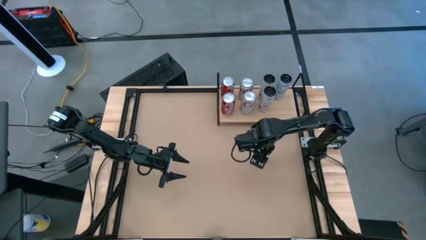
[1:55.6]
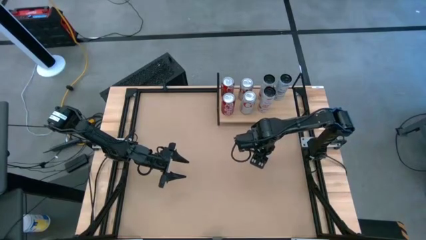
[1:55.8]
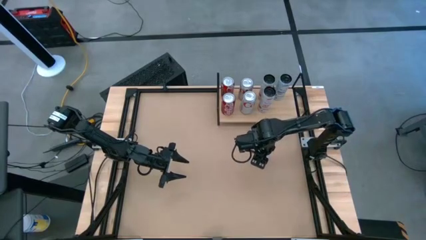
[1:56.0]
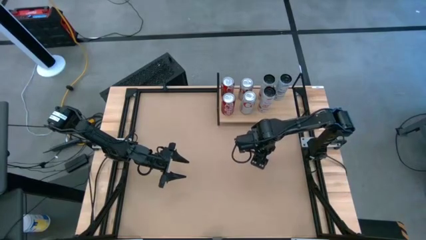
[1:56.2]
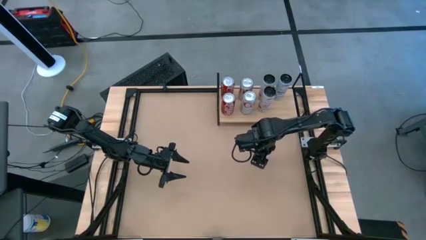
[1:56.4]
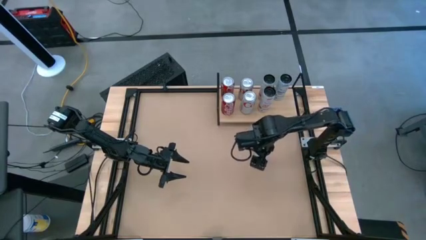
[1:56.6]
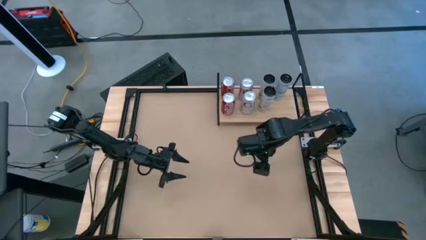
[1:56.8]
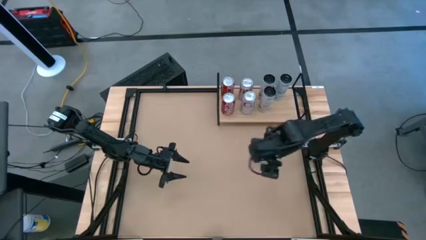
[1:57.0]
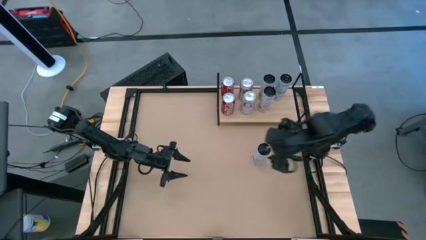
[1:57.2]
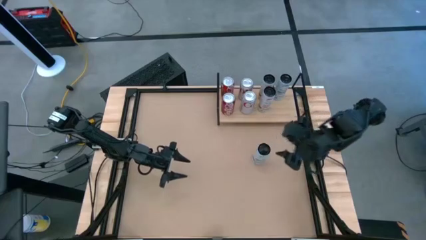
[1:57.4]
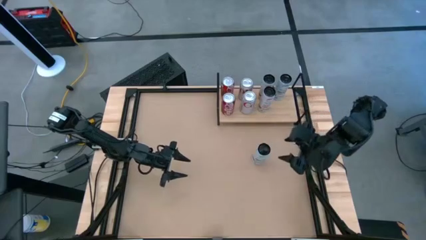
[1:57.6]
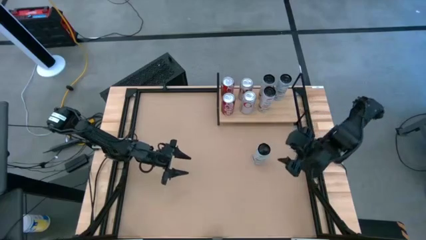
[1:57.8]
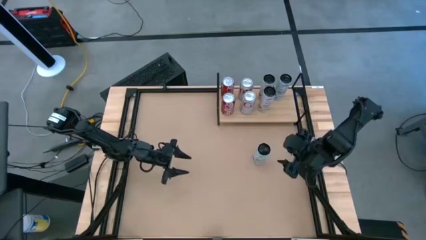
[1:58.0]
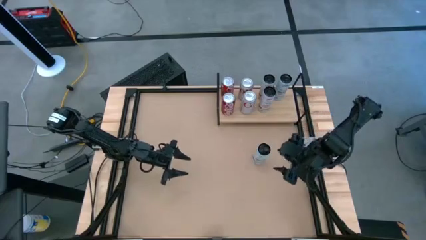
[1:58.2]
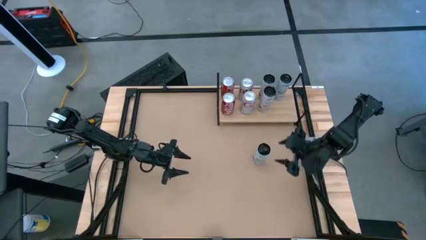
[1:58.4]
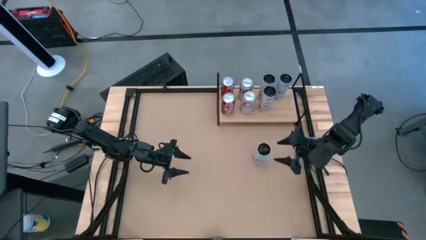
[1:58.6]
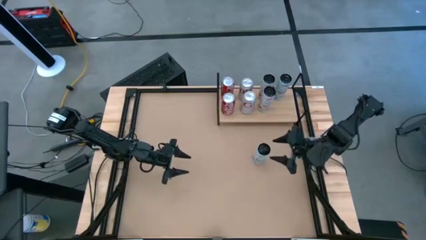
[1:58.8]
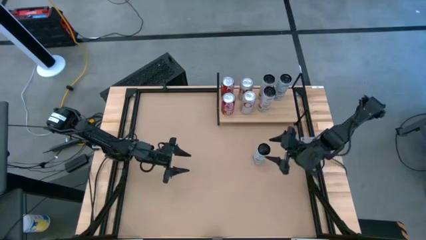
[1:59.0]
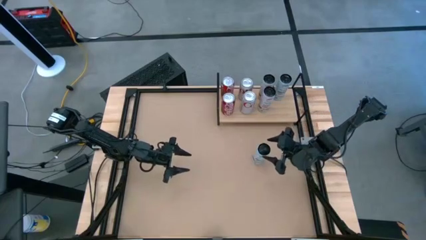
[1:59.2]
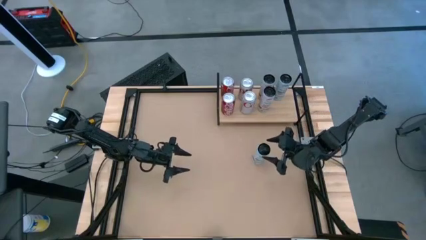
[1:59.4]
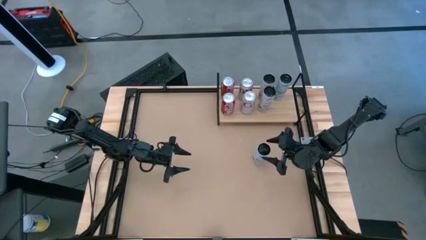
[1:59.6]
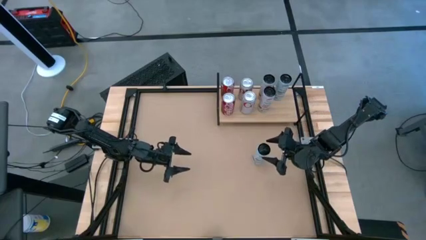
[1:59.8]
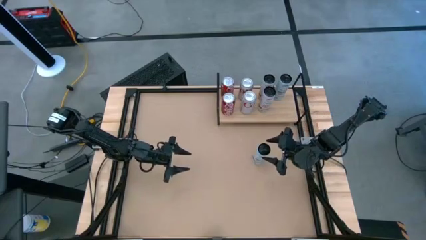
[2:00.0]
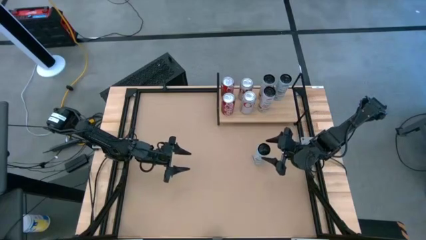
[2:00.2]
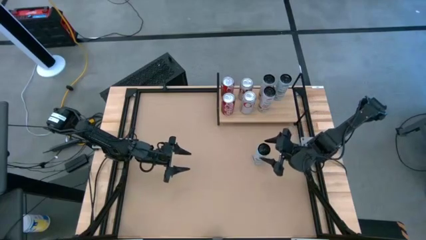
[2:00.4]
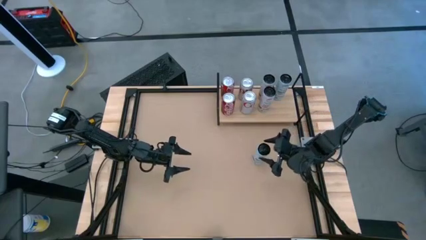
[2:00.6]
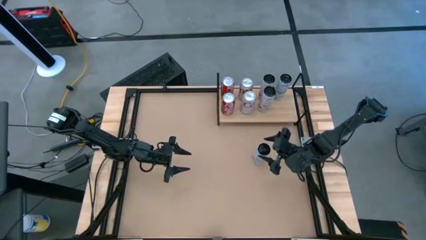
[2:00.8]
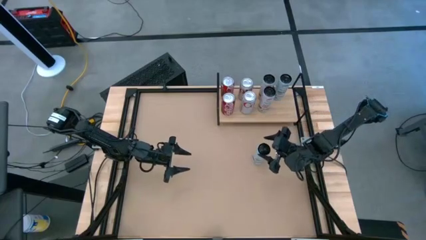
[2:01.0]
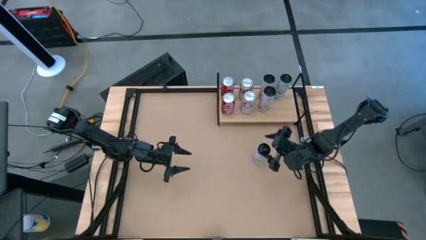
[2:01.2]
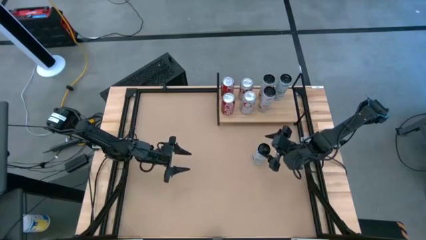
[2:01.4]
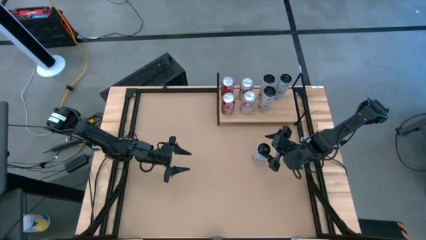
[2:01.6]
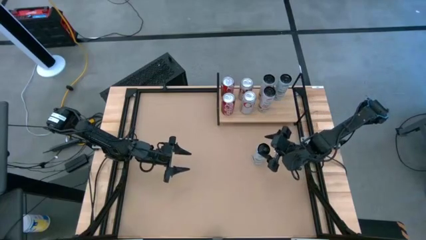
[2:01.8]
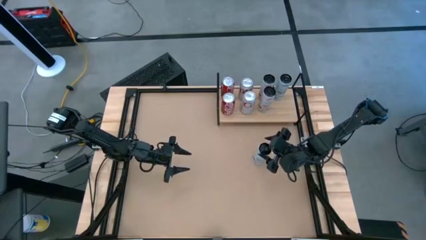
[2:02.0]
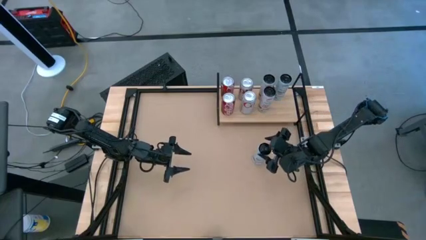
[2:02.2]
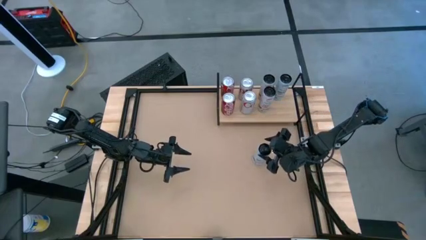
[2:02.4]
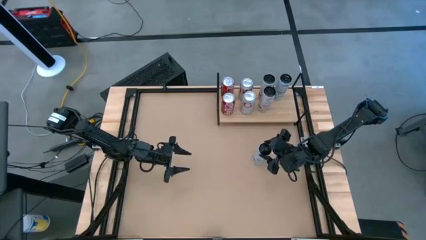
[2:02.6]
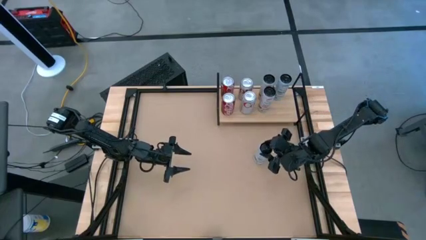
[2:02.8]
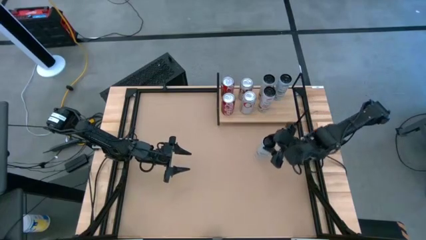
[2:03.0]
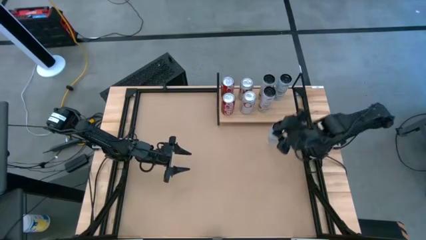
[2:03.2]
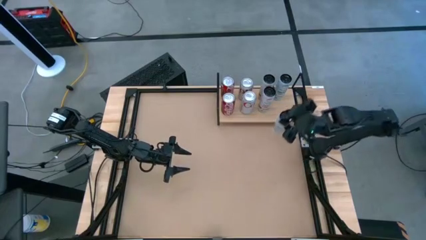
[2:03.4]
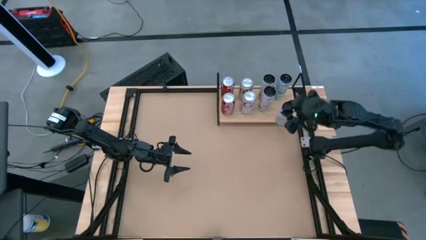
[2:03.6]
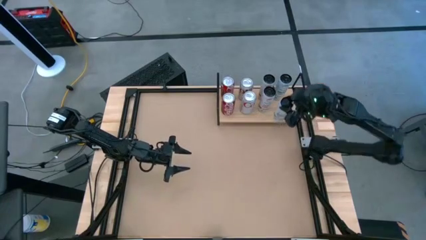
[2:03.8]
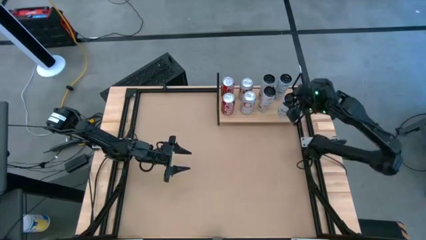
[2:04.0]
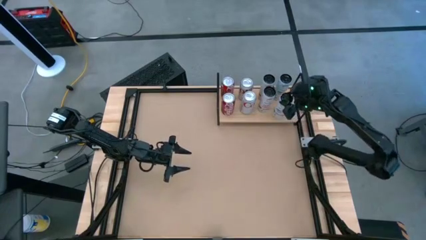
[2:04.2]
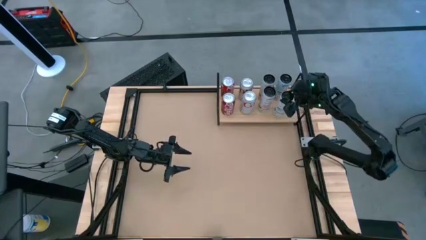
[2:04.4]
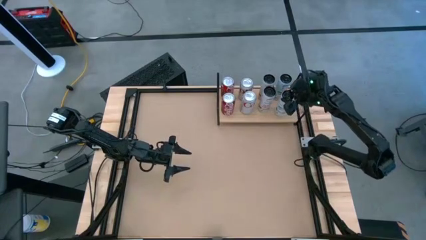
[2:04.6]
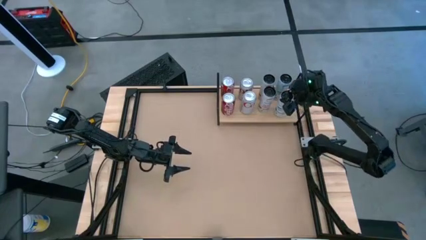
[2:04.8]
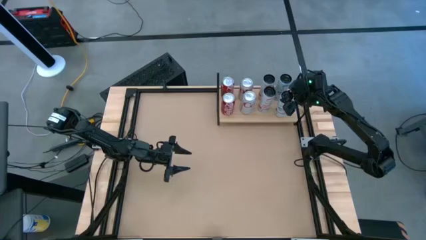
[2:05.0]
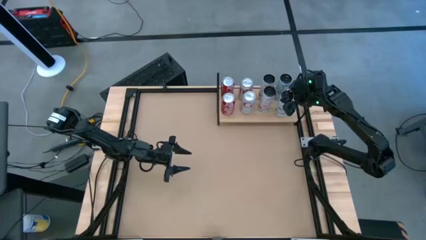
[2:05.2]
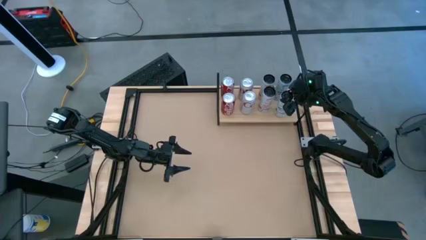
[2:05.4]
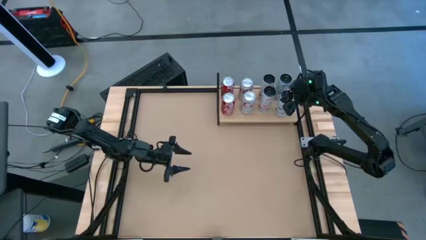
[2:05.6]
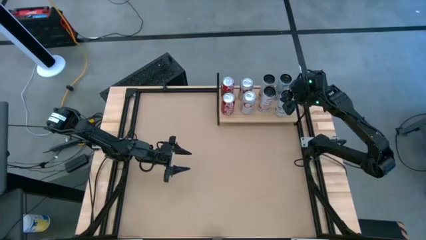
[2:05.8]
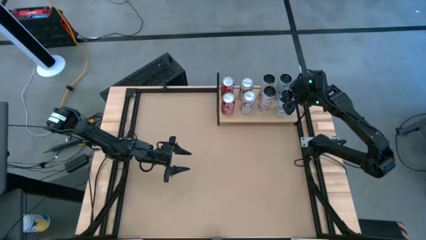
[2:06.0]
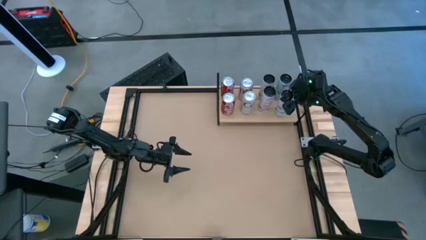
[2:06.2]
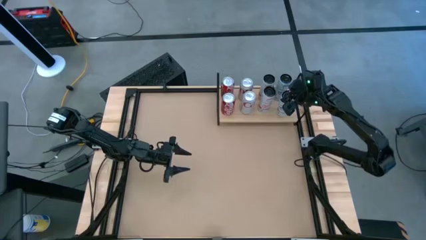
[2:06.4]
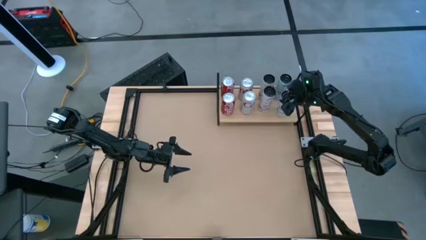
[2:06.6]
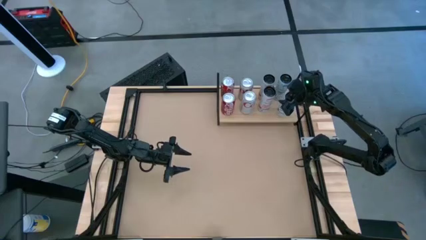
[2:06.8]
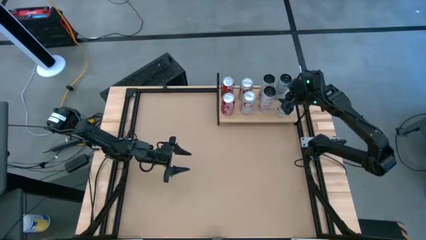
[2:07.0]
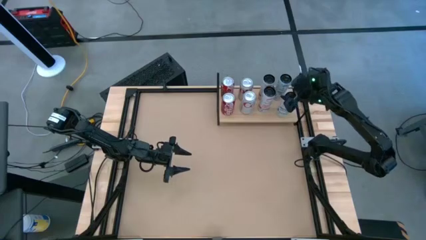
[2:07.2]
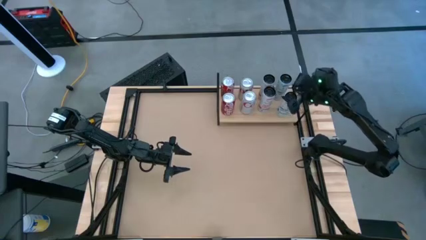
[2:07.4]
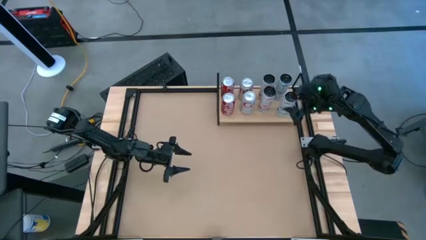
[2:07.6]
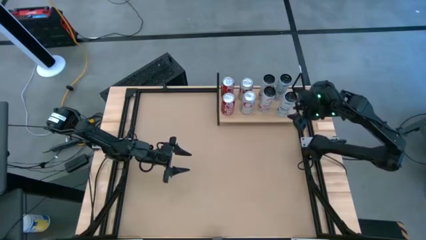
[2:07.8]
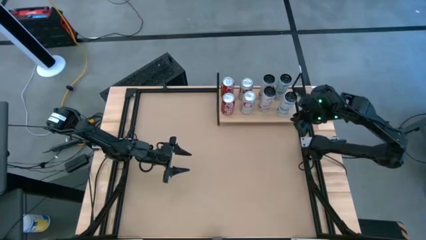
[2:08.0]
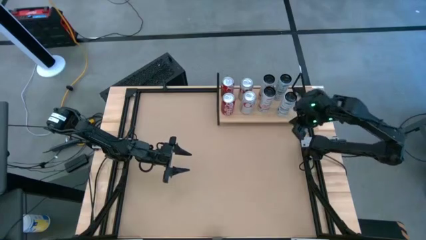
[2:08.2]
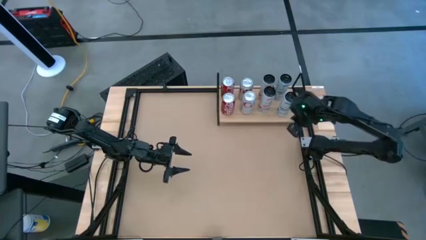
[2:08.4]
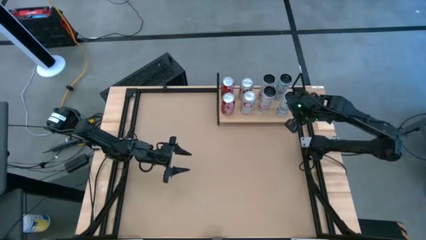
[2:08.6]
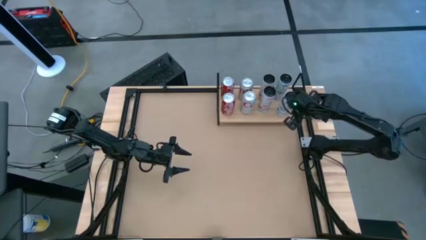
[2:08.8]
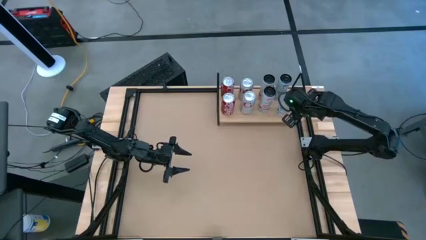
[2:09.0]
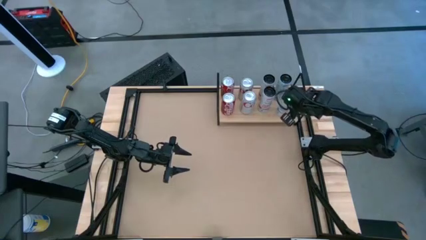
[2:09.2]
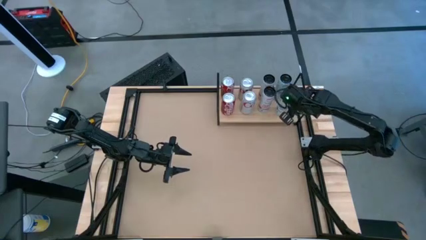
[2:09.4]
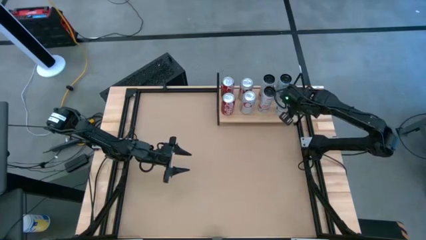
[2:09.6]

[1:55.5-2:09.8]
Task: Place canned beverage on shelf
Put the blue white soda can on the shelf aligned with the other blue white soda can
